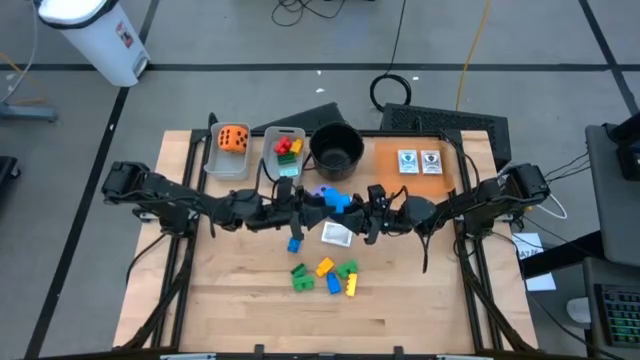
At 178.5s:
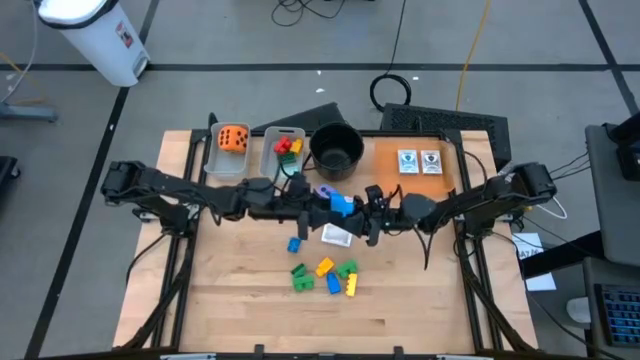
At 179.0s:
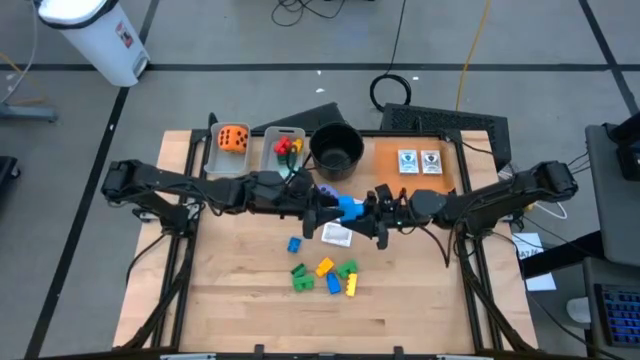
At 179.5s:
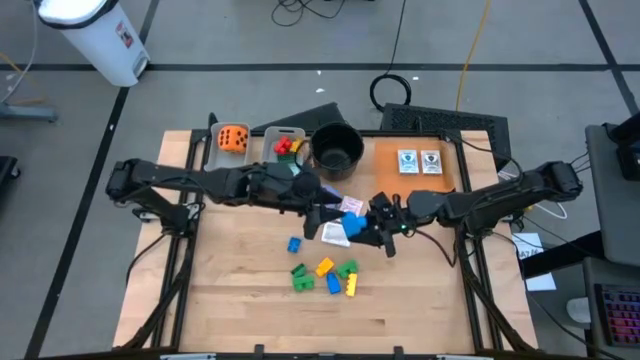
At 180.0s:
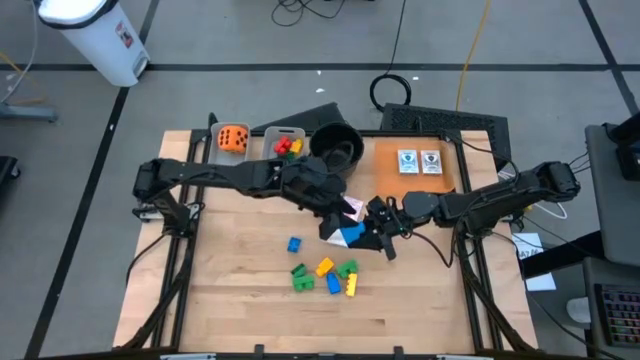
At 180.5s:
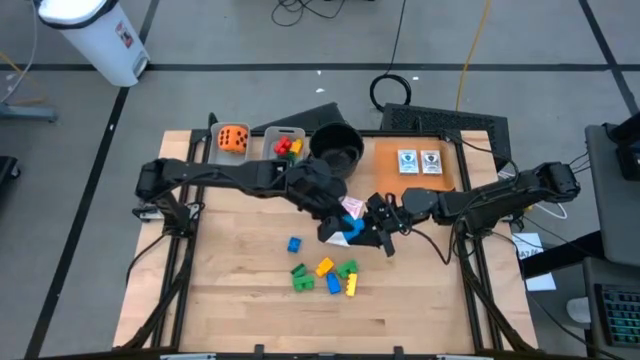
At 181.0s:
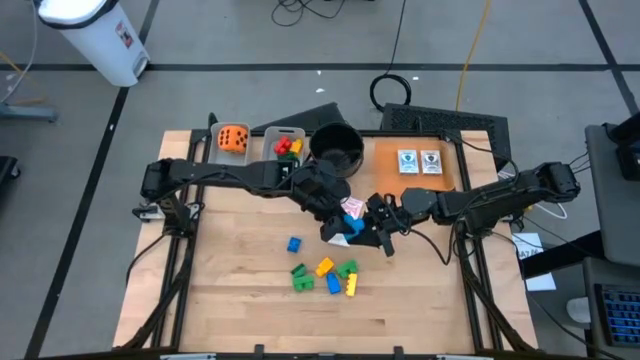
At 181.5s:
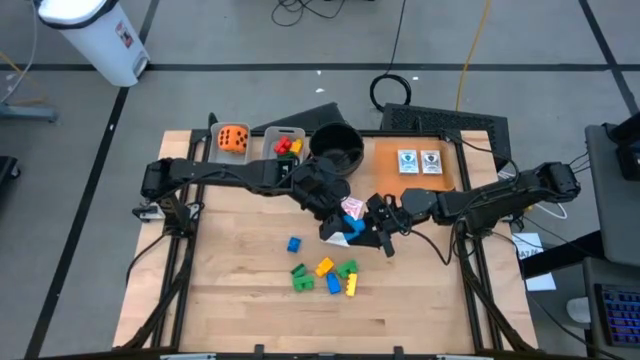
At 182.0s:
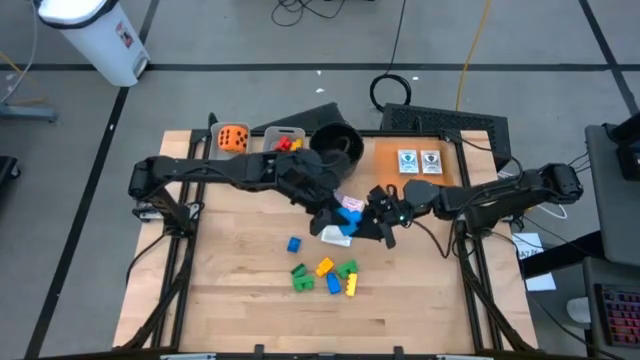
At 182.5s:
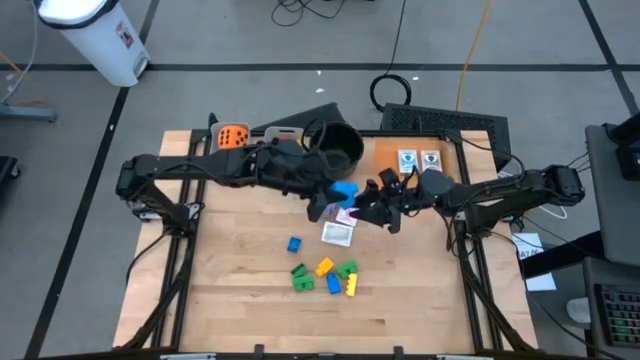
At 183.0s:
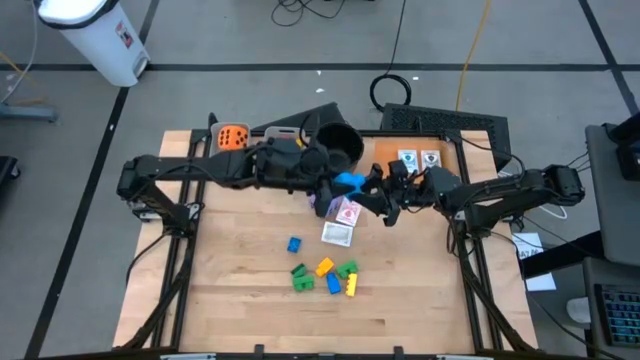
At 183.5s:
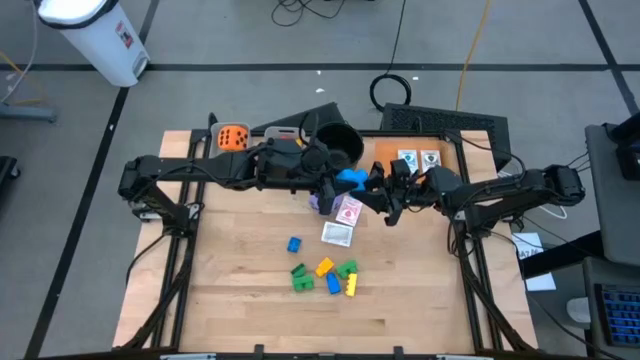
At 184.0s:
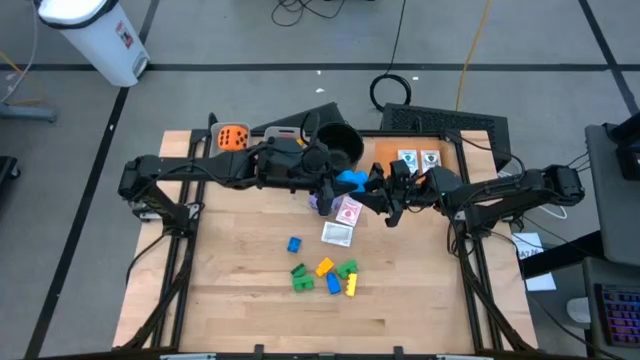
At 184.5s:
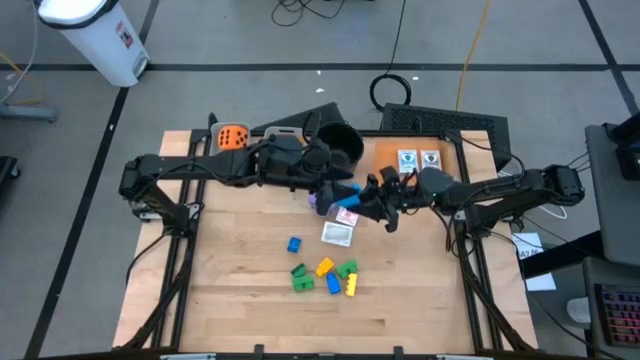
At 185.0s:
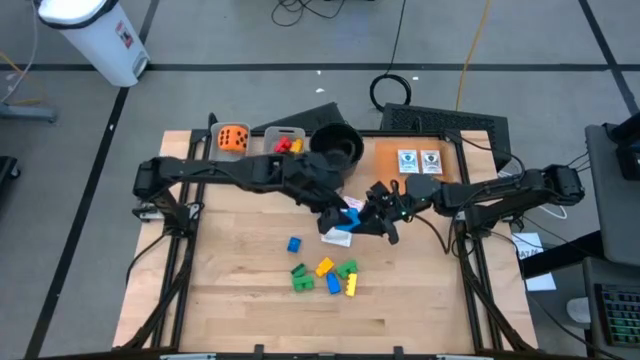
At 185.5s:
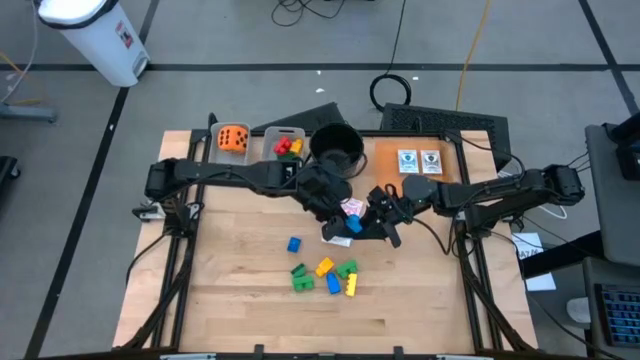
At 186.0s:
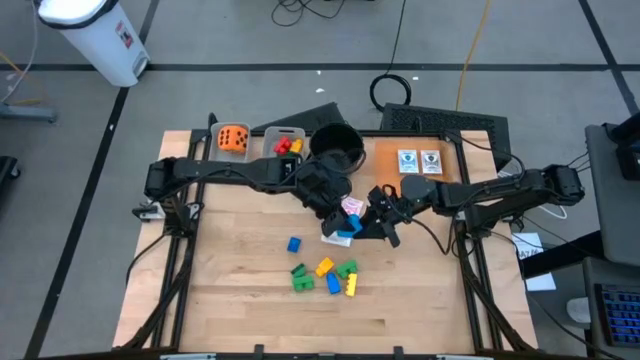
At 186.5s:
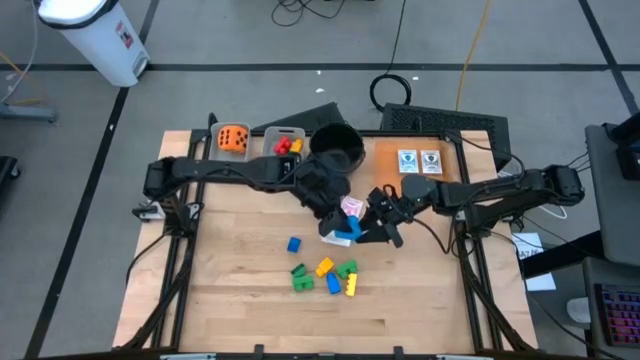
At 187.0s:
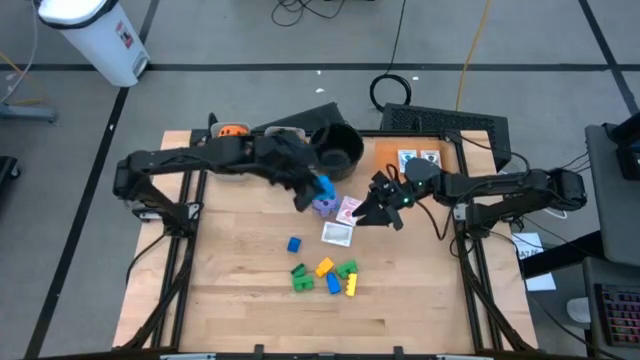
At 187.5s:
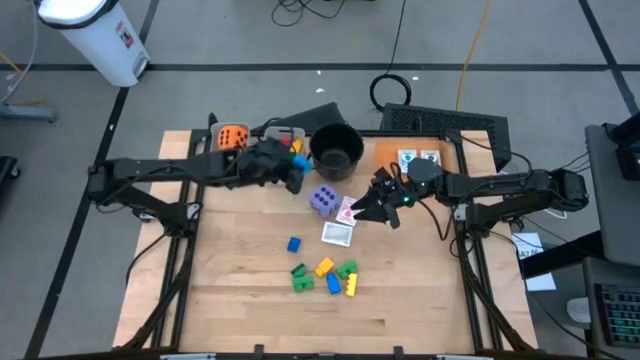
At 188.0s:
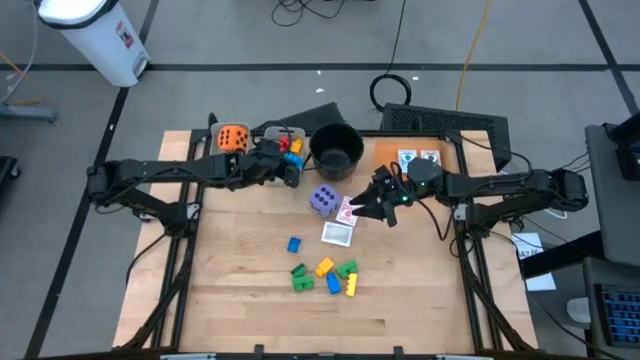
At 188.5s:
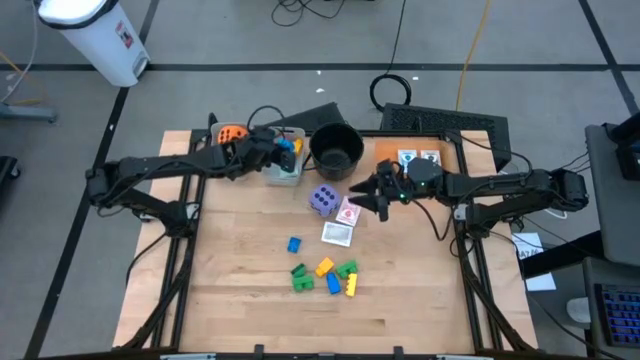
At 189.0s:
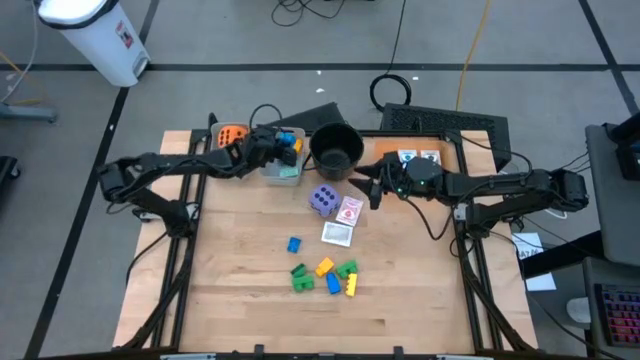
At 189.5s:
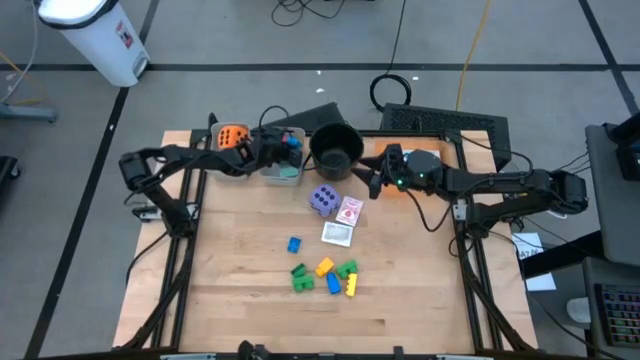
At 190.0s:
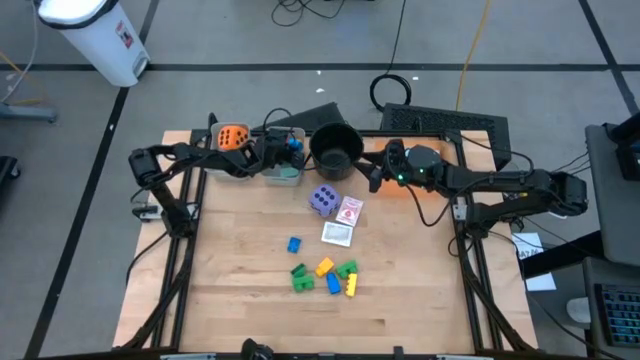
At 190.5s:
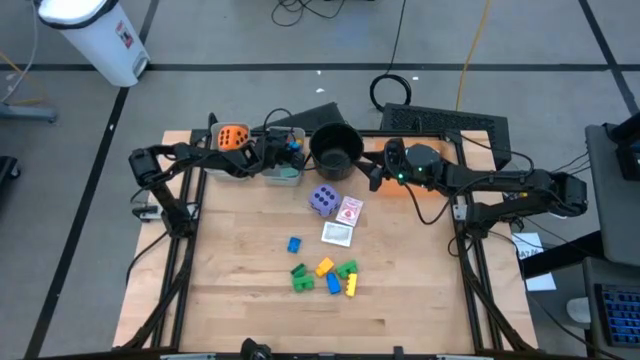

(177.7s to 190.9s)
Task: Pick & Place Toys
Put the blue game piece into the right gray bin

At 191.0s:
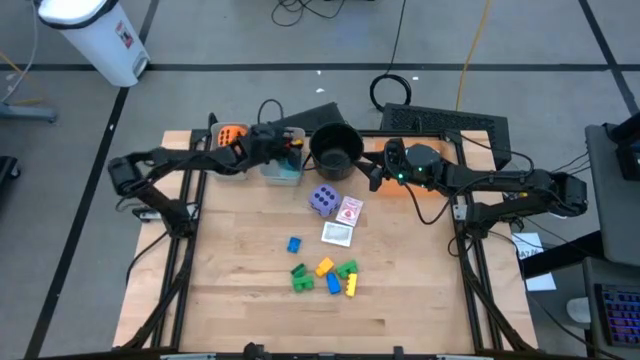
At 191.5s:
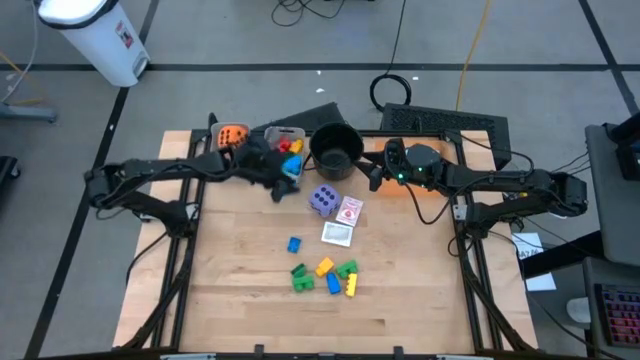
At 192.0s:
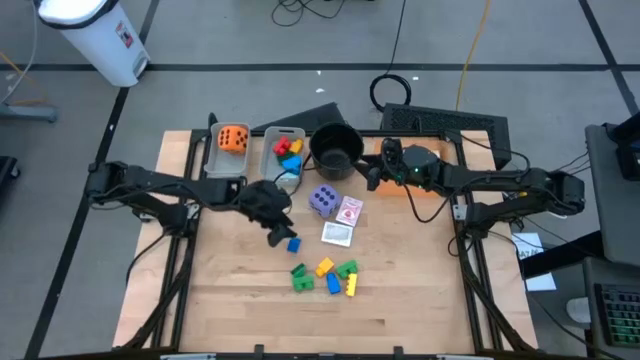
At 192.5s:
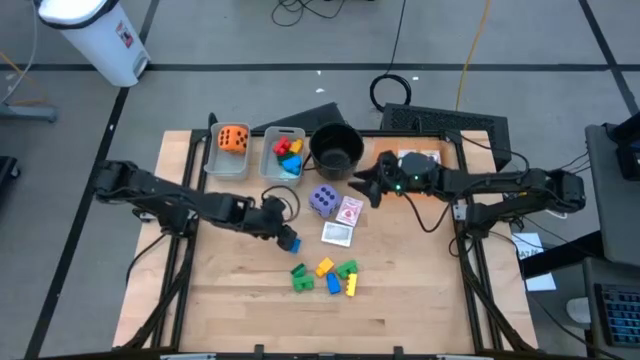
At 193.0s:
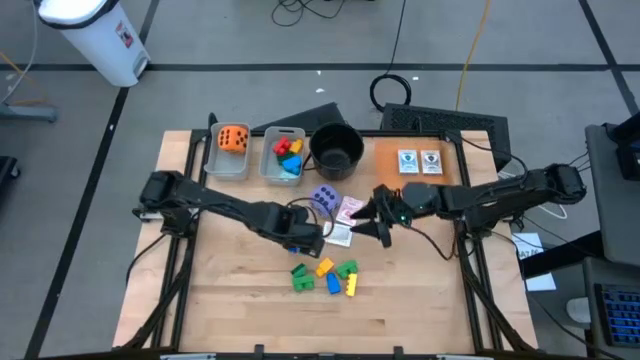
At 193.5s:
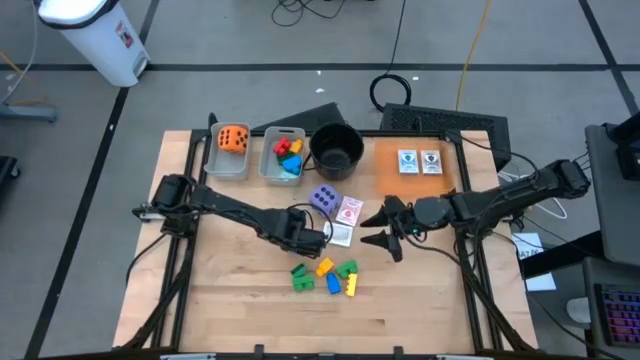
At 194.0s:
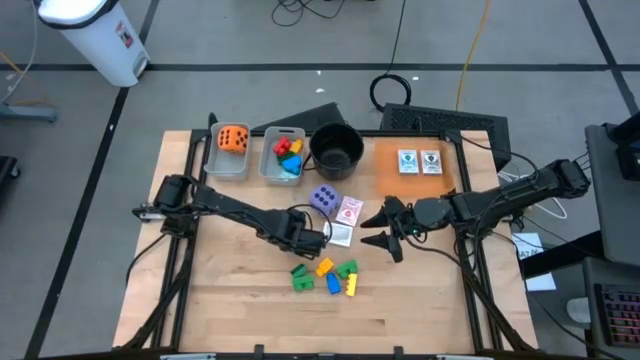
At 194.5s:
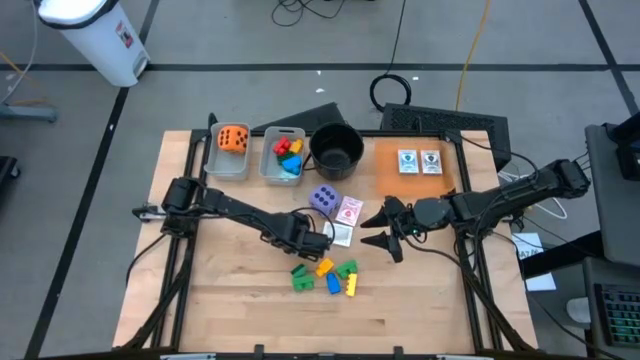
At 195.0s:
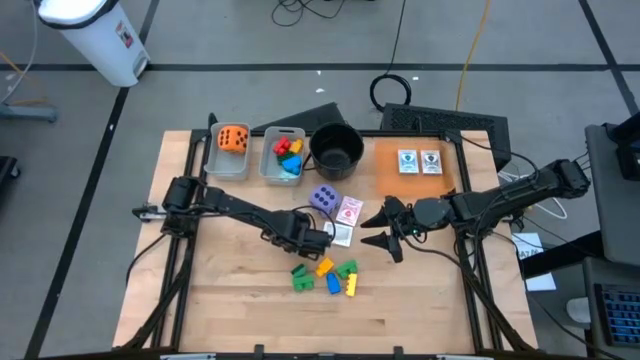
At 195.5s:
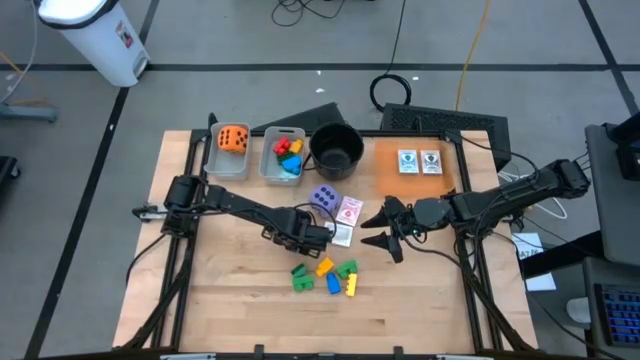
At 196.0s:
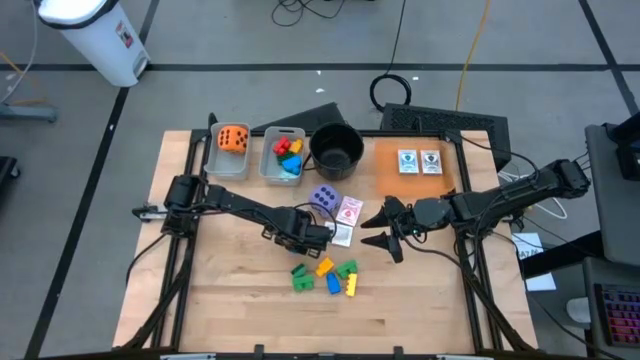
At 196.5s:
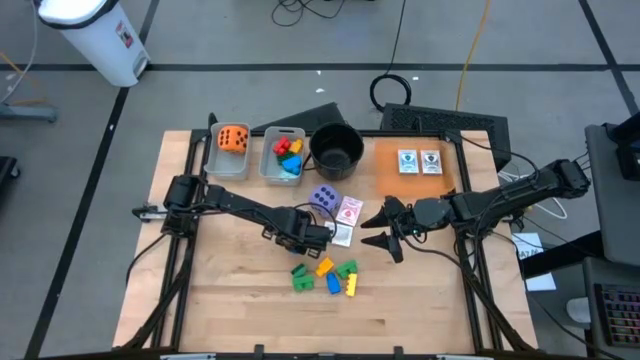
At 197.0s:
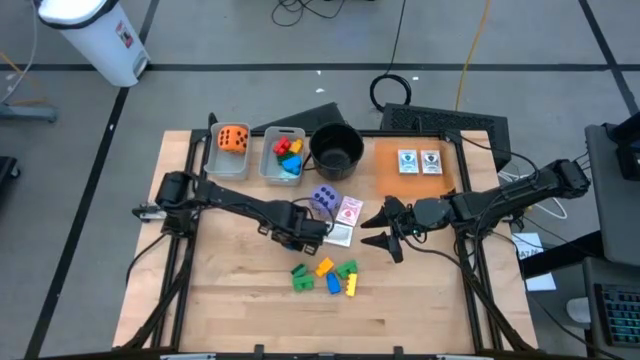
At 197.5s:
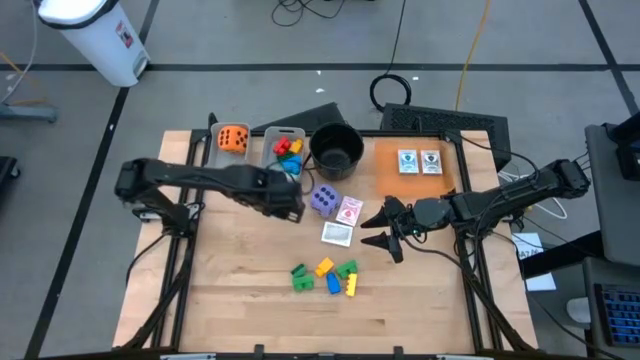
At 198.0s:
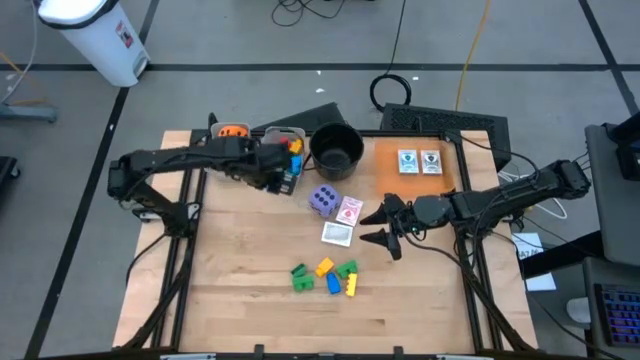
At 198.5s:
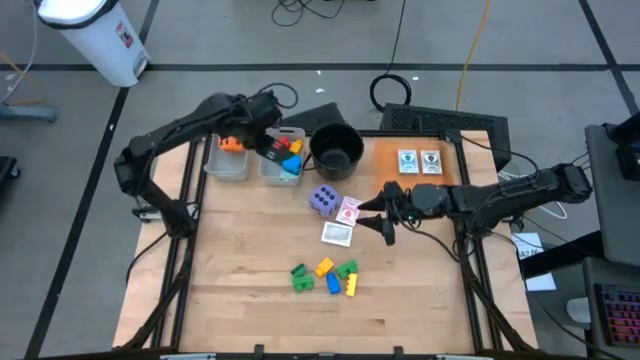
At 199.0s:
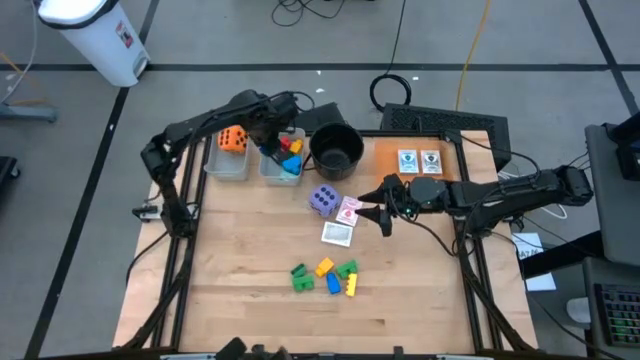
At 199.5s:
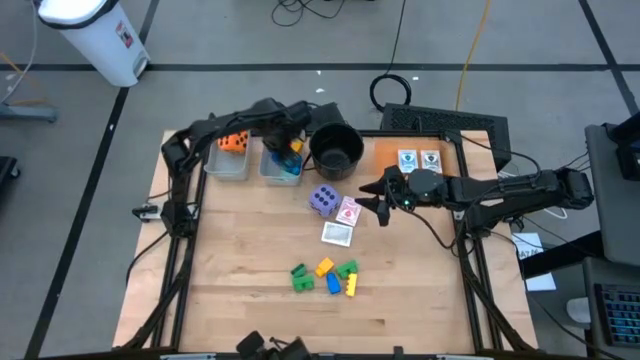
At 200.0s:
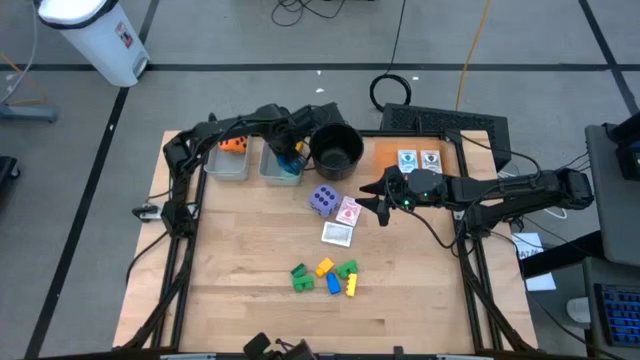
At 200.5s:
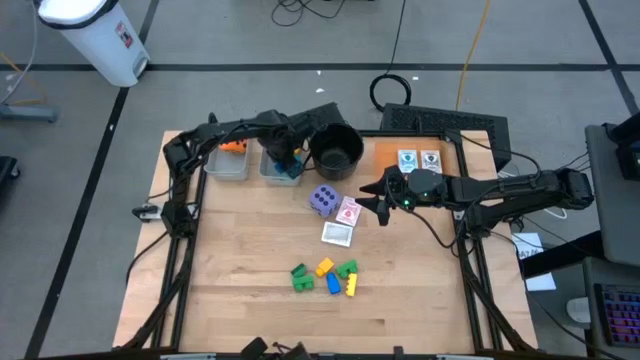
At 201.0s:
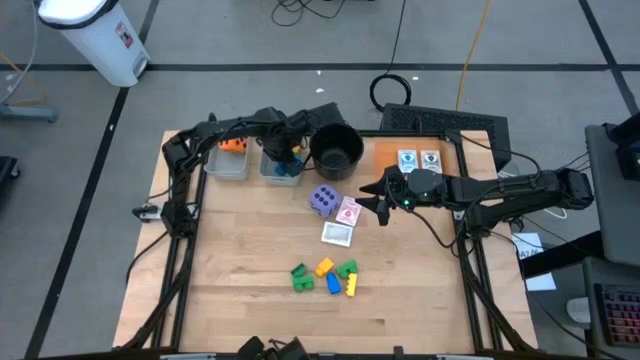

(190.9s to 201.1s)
Put the blue game piece into the right gray bin
